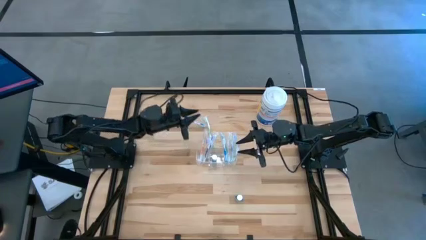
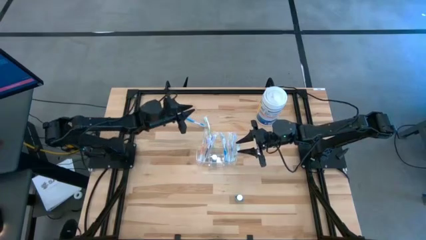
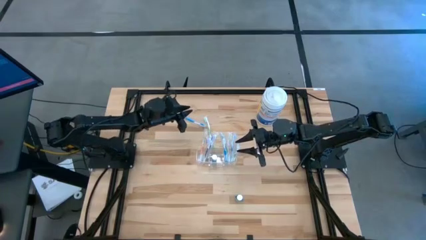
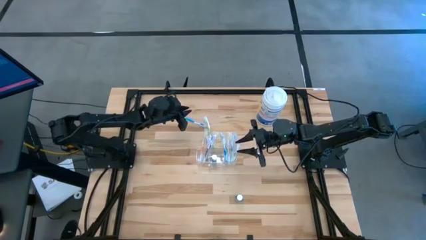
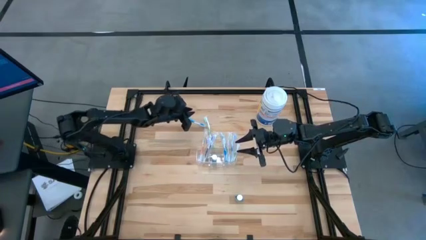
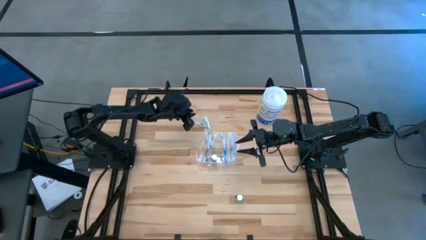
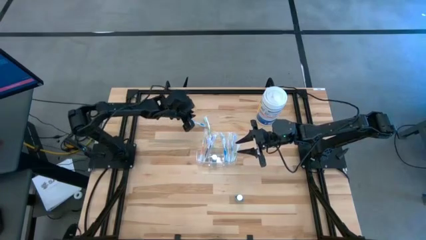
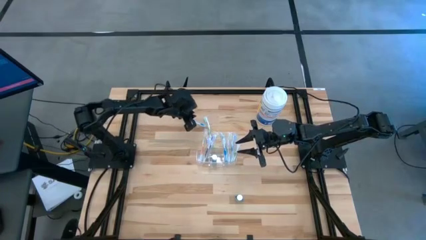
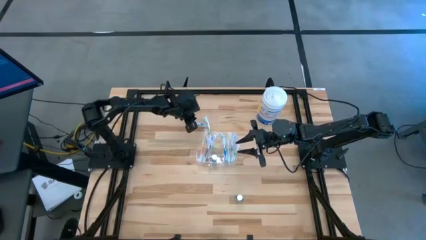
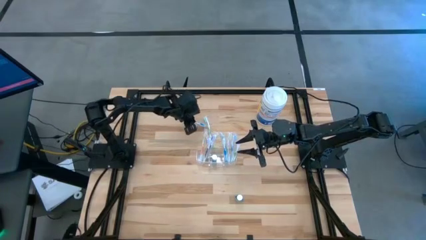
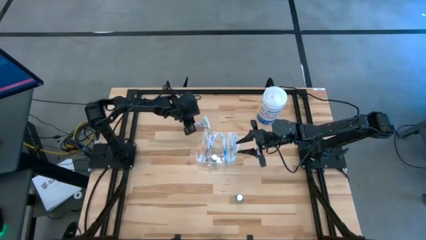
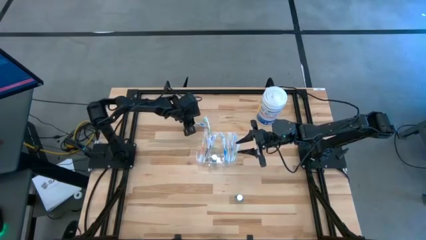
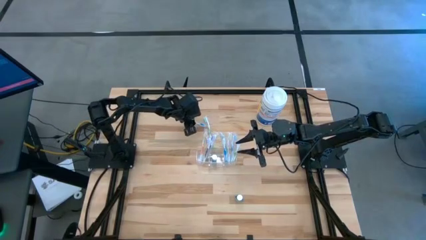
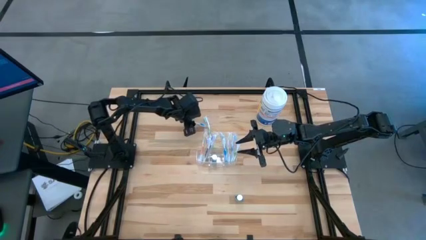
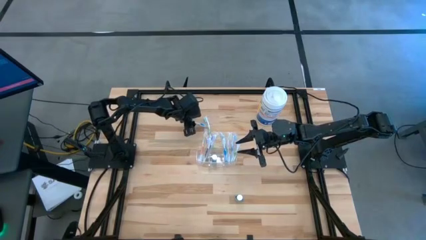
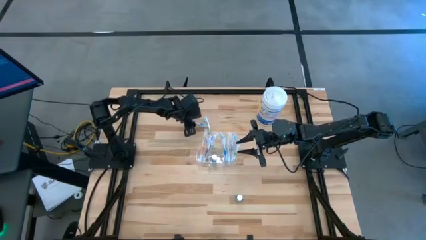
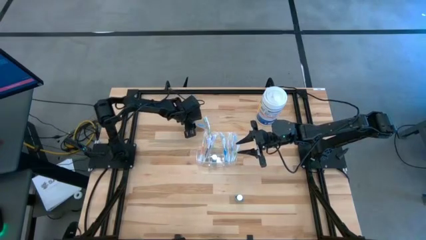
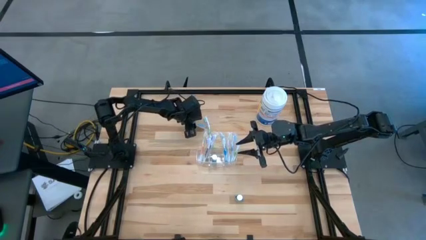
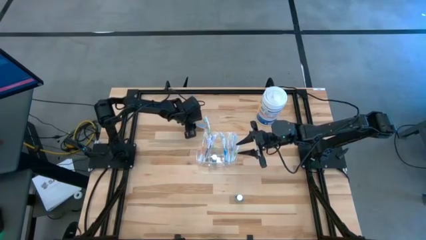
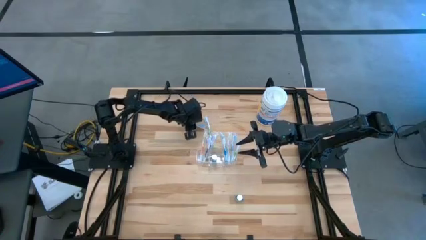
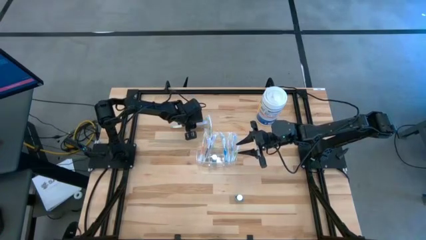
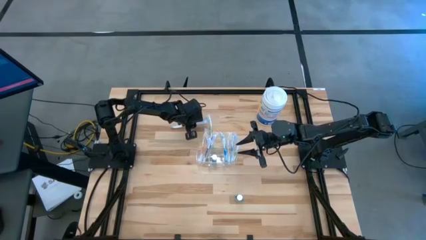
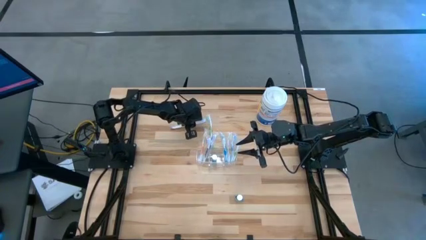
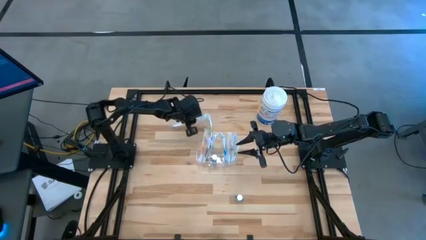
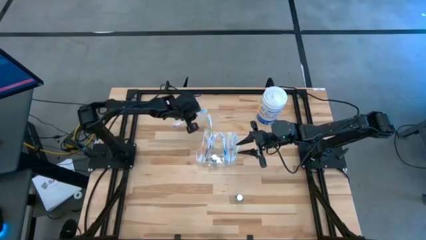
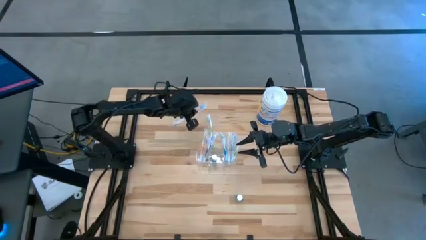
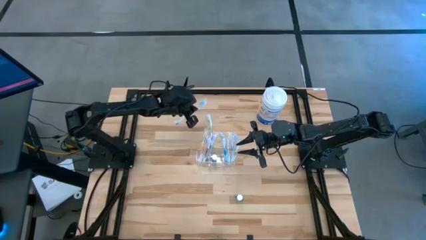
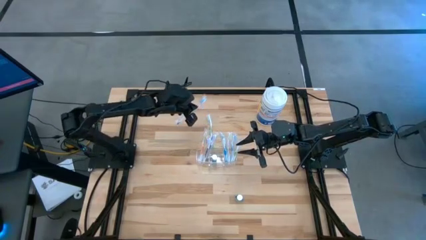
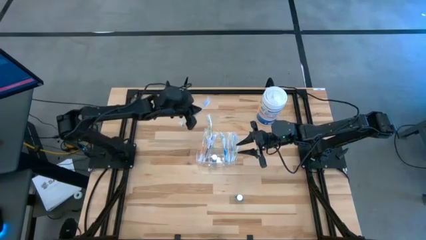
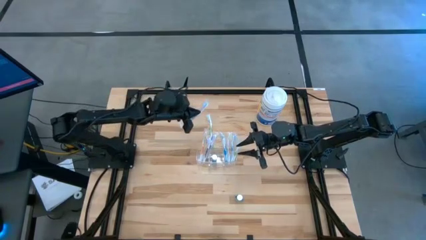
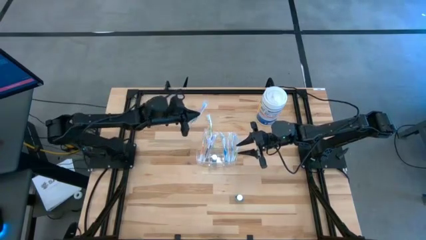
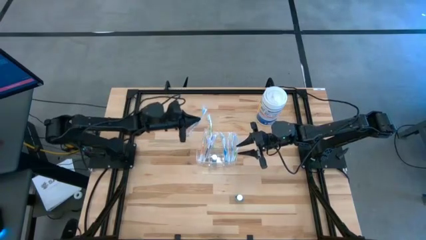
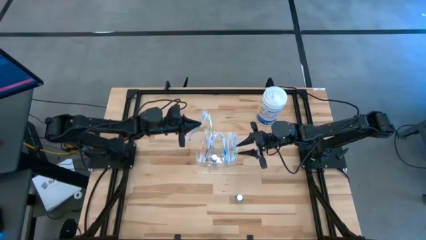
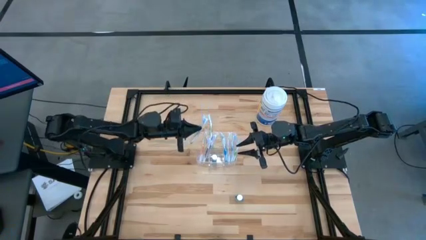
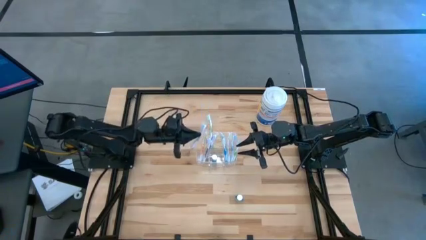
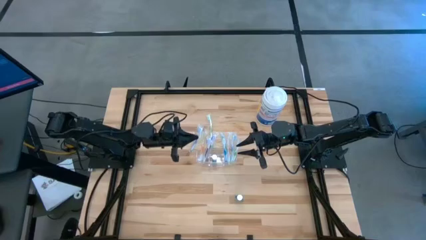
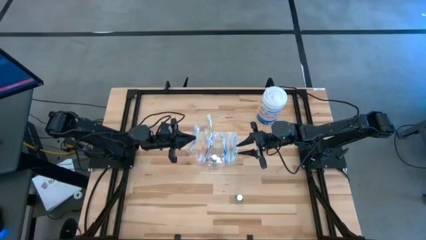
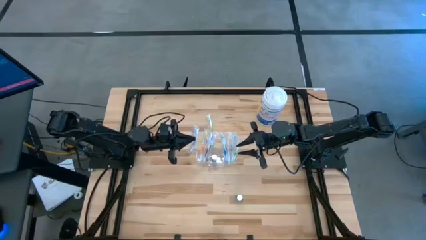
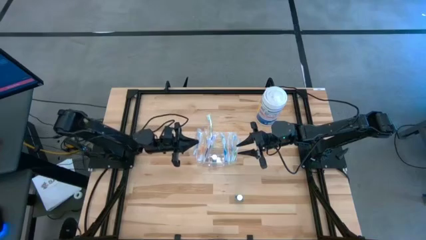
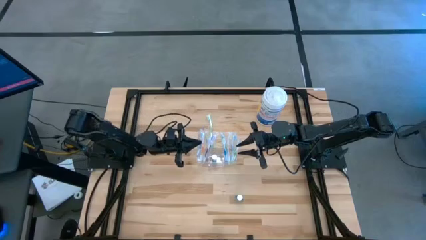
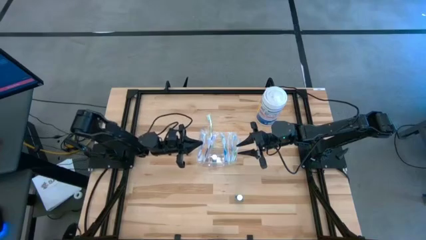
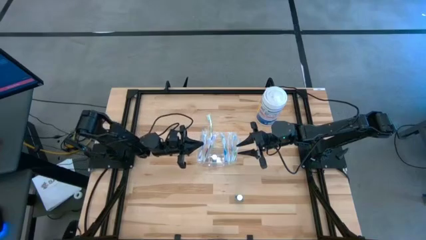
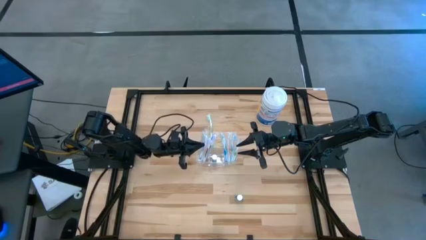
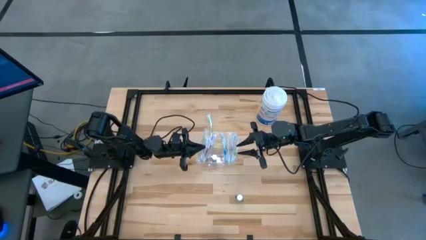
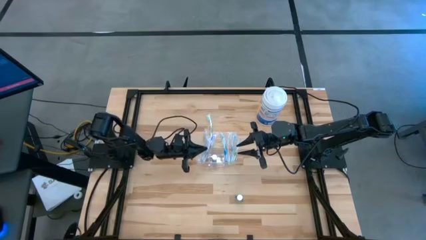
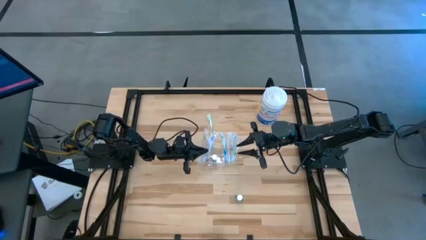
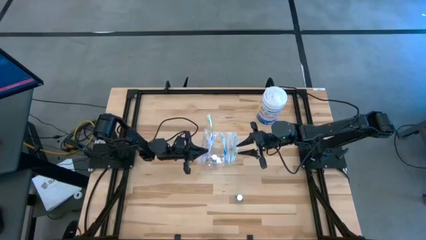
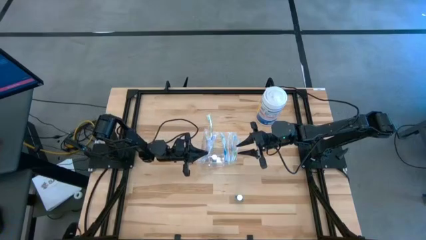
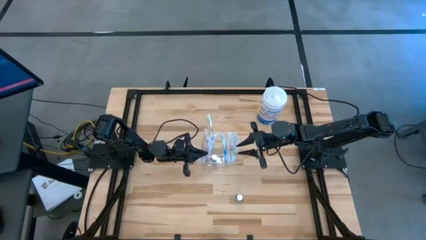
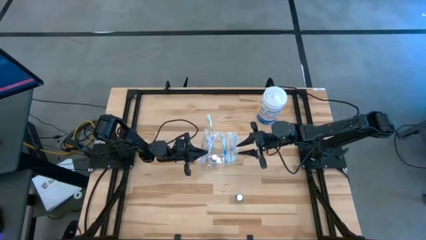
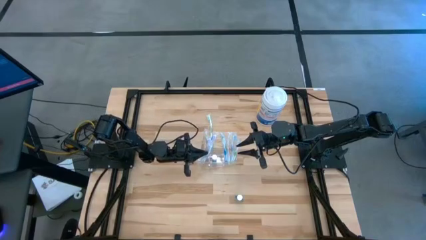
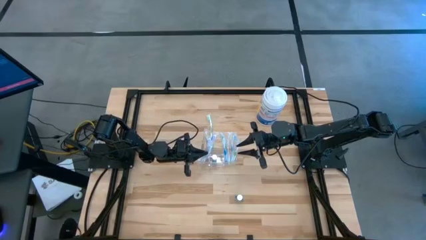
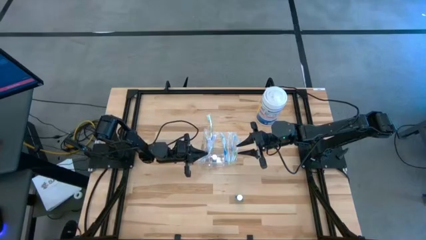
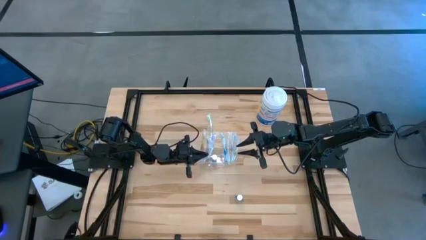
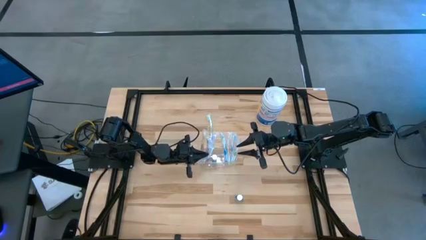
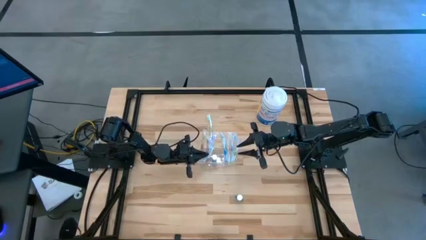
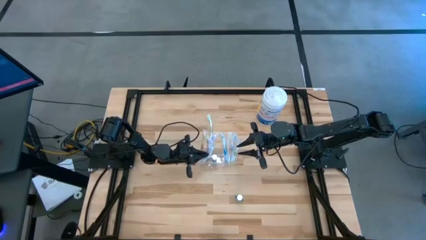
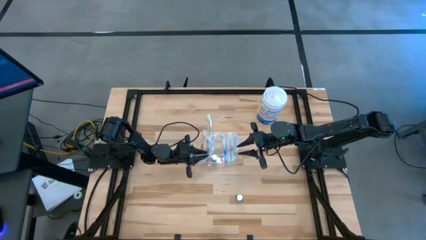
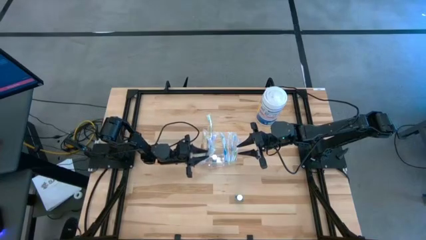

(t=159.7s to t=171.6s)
Task: Pick & Place toothbrushing station
Put the blue toothbrush into the transparent organizer

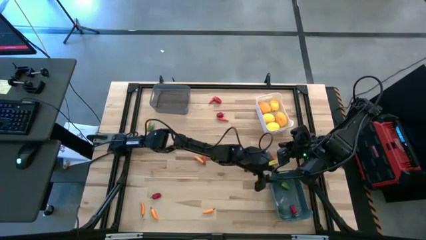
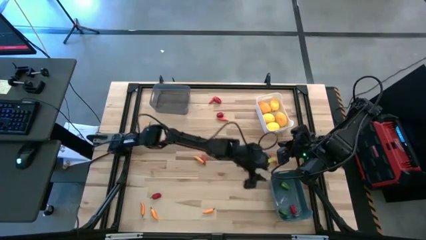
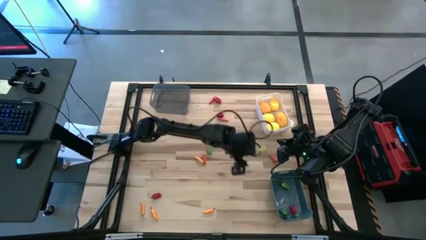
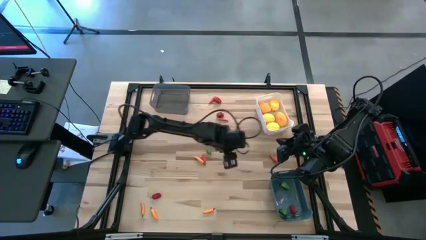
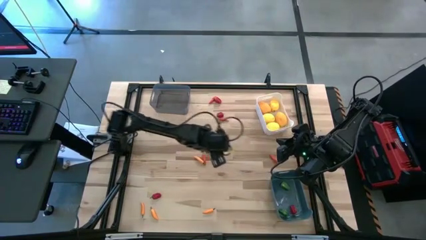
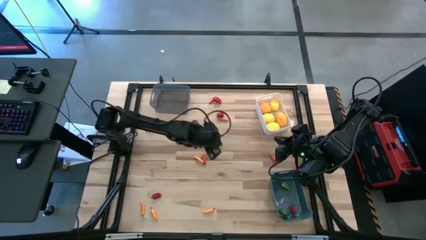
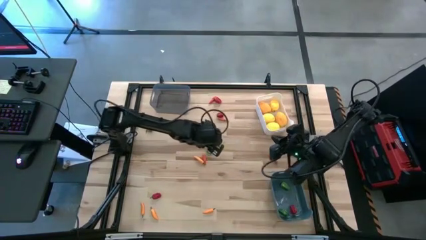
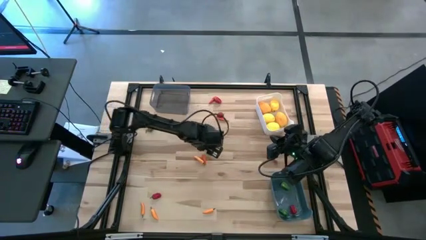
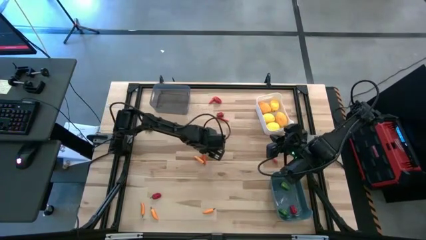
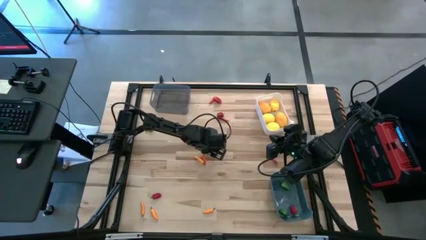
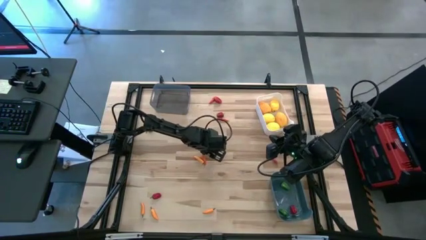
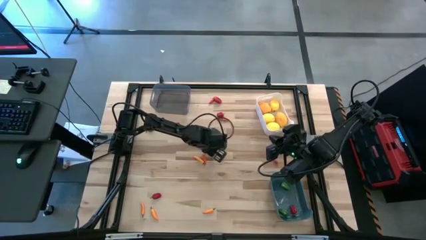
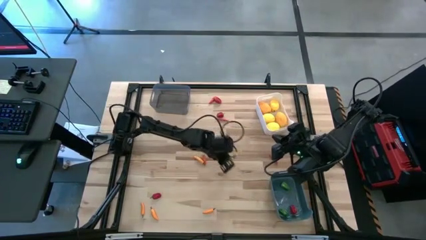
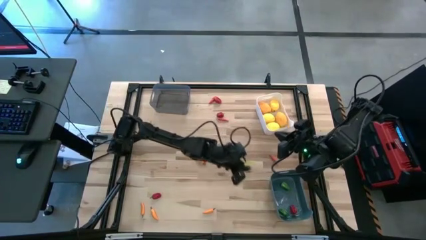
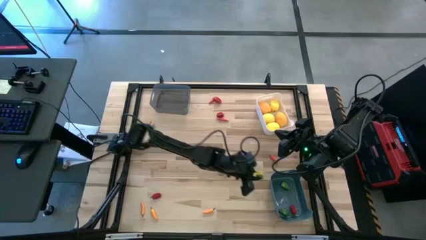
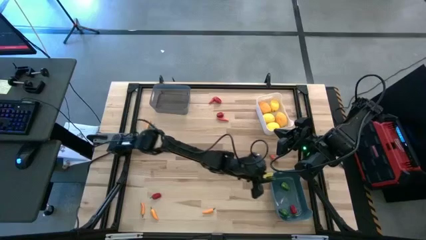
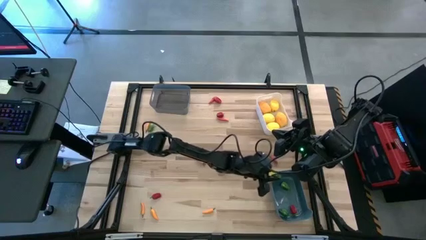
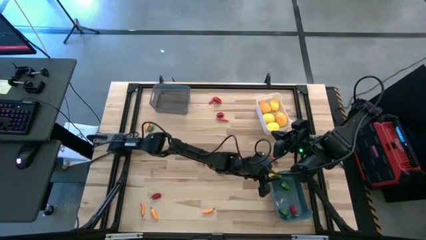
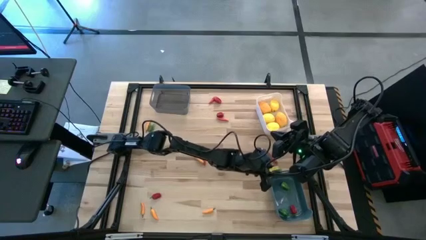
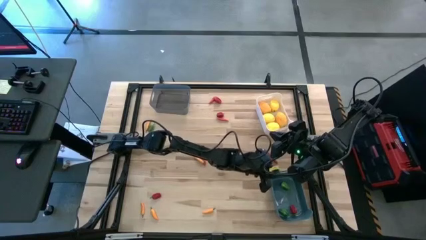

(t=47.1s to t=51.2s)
Task: Sort produce into baskets
Put the green chili pepper into the blue bin

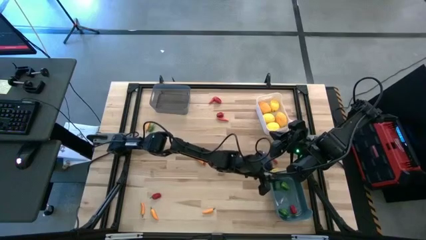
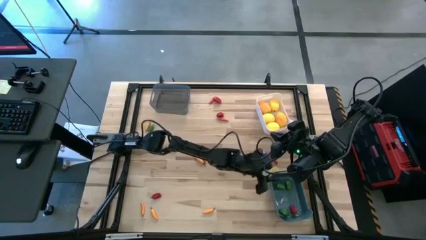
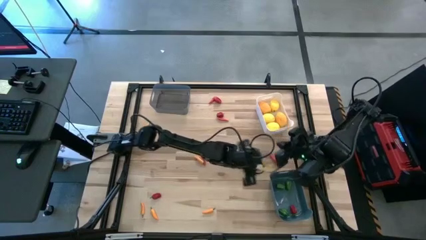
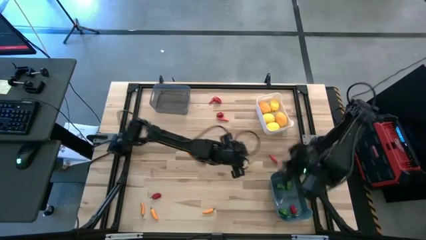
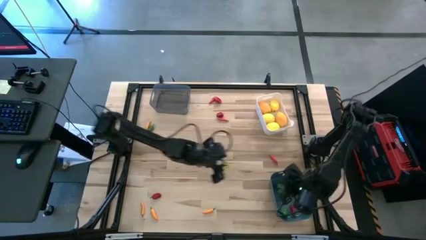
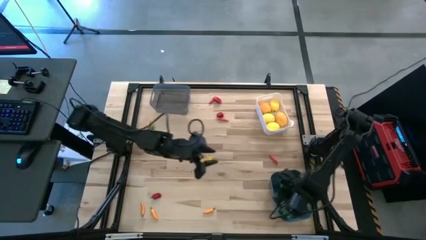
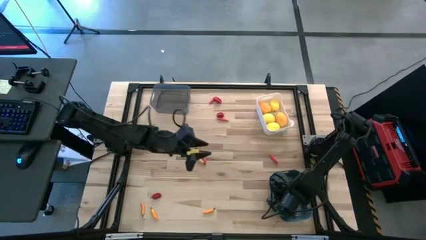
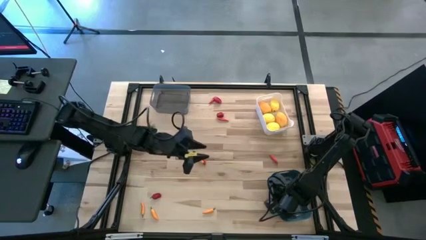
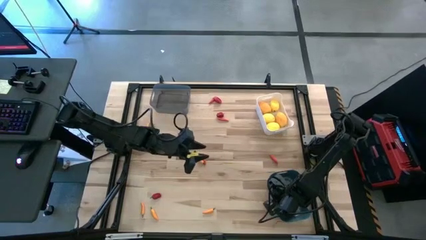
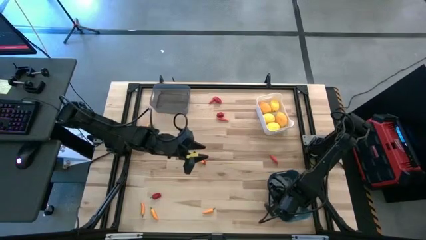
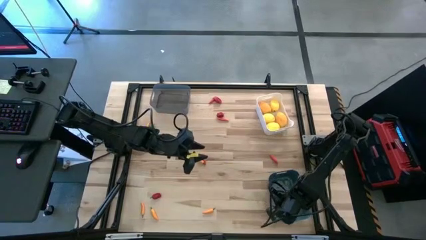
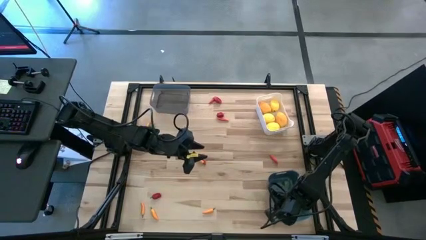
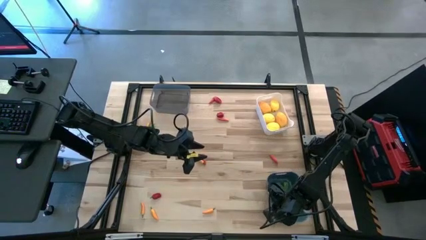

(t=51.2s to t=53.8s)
Adjust the blue bin
